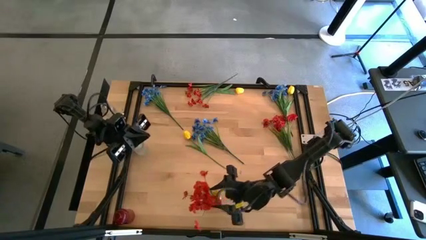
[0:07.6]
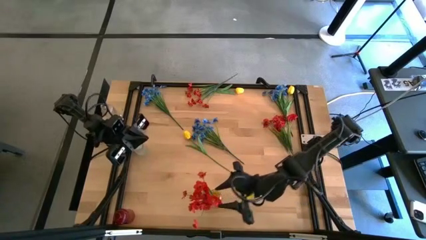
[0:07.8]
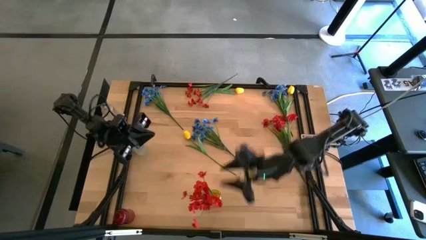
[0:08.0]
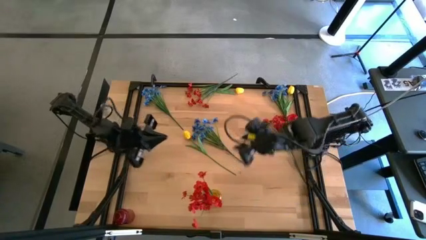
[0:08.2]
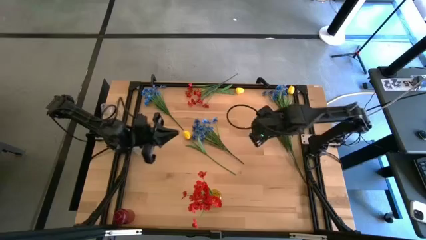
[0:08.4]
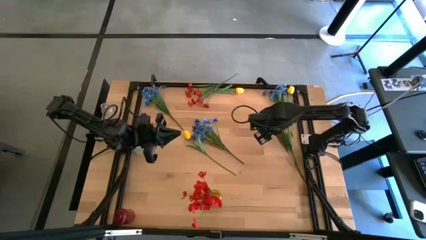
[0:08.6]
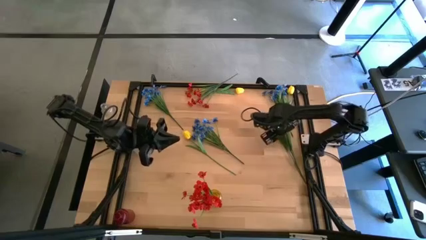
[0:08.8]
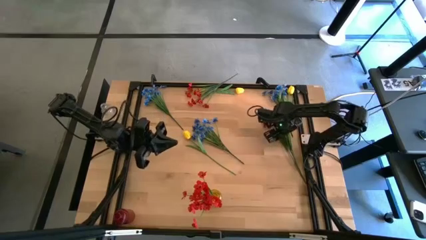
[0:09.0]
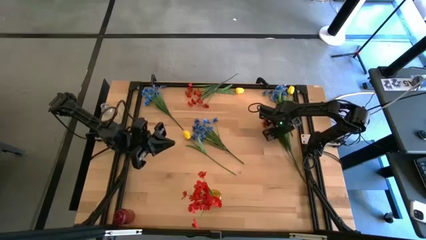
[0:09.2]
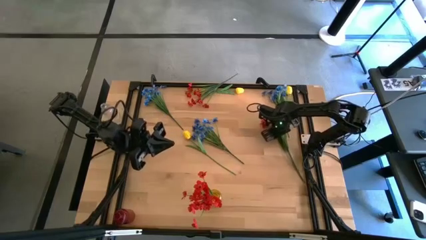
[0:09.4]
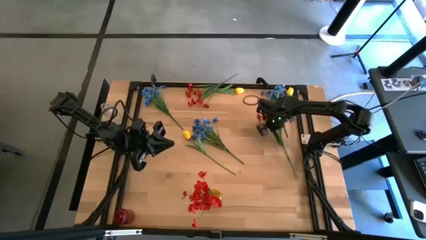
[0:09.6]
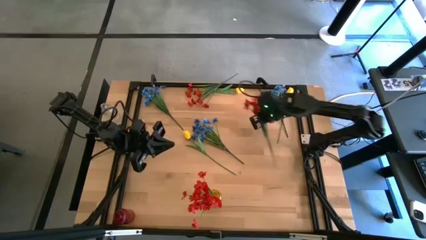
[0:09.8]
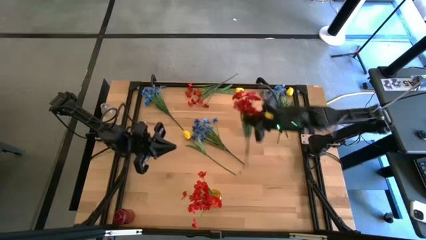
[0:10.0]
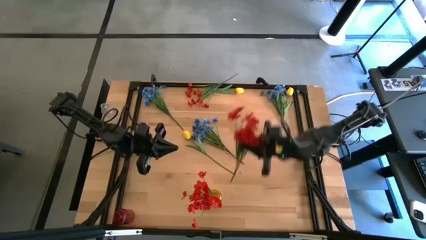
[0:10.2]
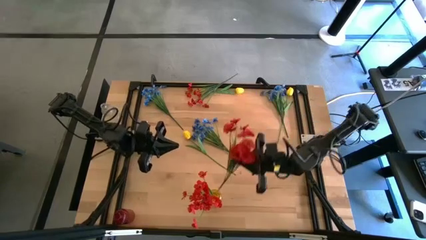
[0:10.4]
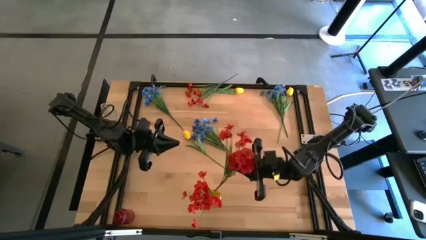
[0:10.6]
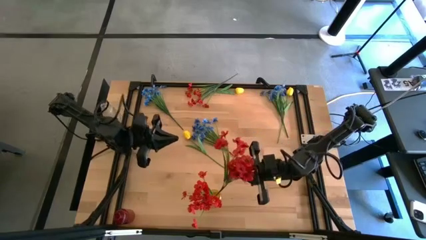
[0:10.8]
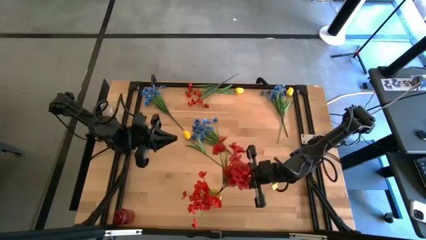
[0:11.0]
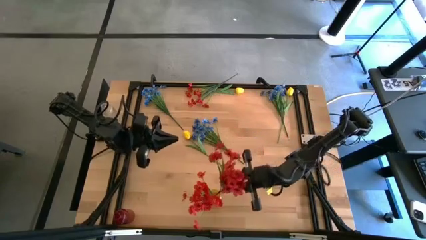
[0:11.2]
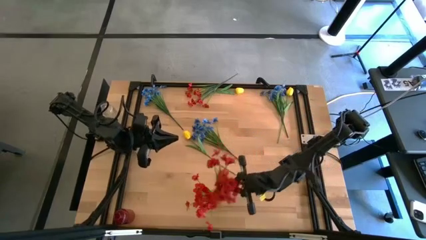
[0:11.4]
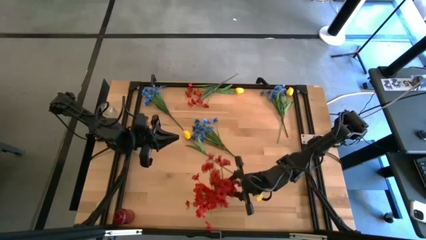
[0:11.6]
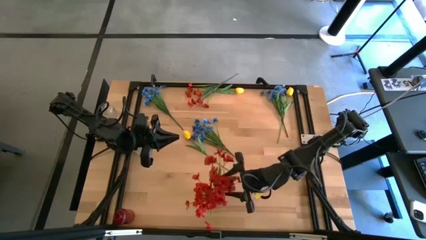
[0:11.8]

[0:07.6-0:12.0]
Task: Sort flowers into vase by color
Put the bottom red flowers into the yellow vase

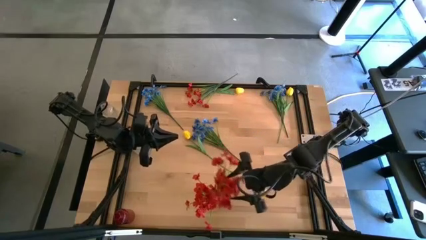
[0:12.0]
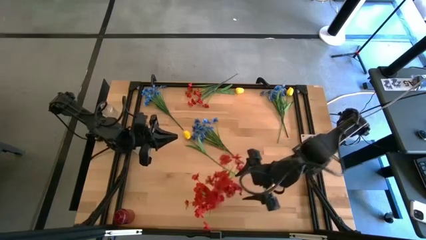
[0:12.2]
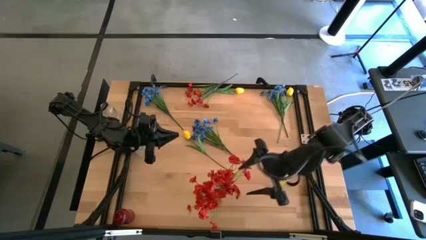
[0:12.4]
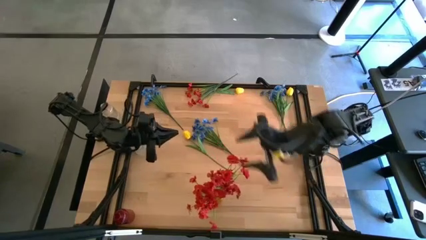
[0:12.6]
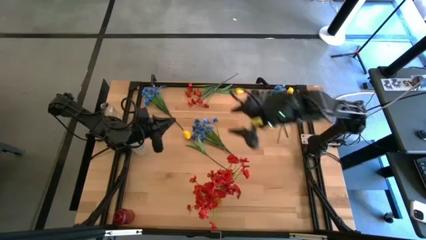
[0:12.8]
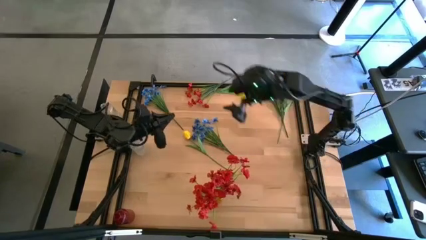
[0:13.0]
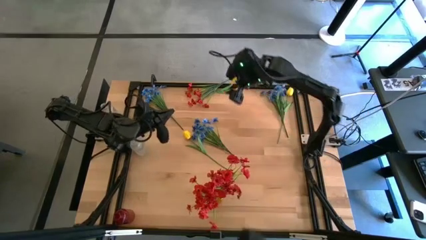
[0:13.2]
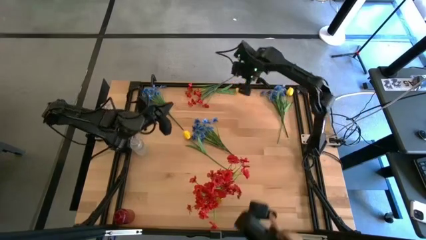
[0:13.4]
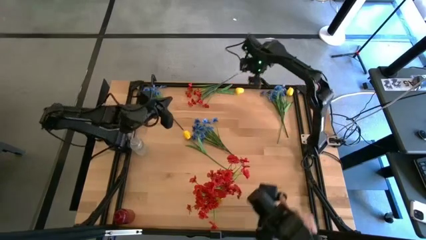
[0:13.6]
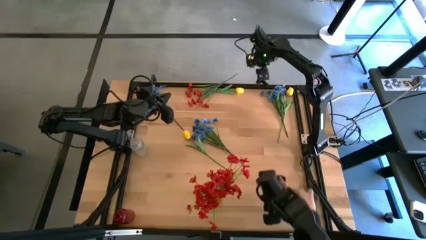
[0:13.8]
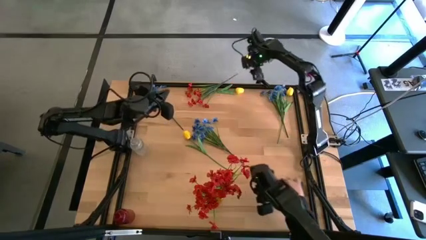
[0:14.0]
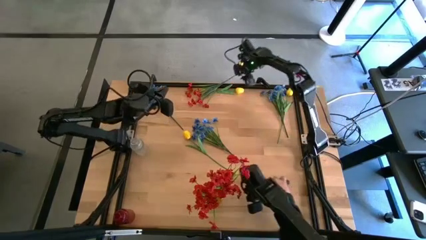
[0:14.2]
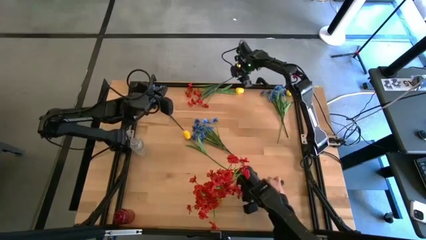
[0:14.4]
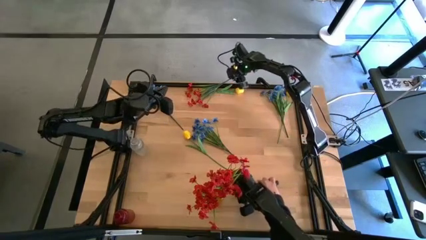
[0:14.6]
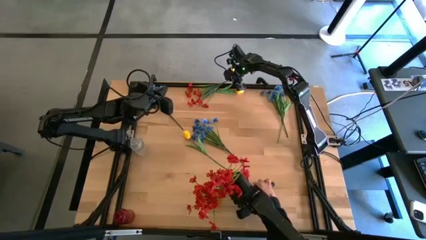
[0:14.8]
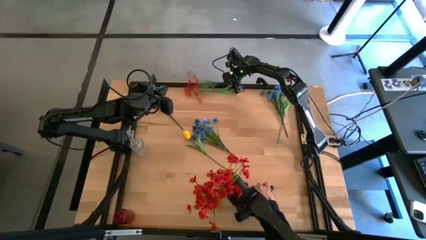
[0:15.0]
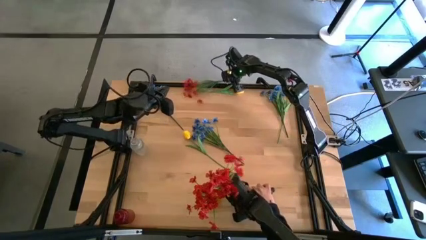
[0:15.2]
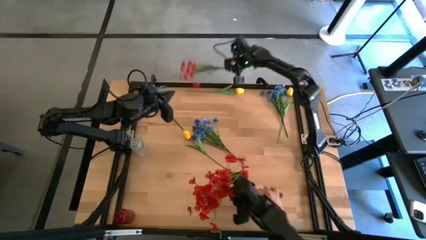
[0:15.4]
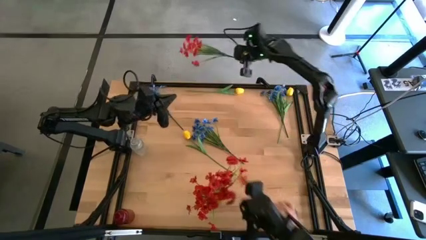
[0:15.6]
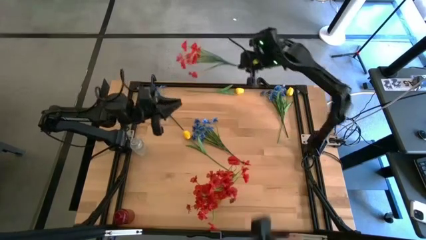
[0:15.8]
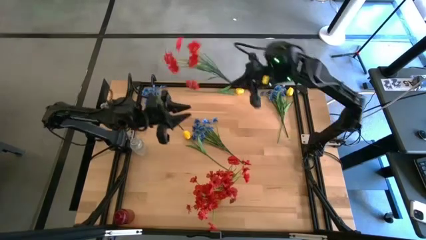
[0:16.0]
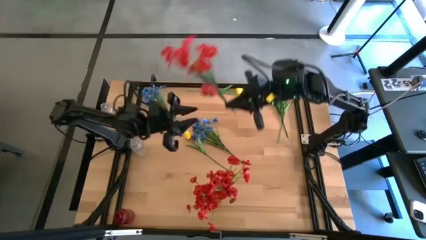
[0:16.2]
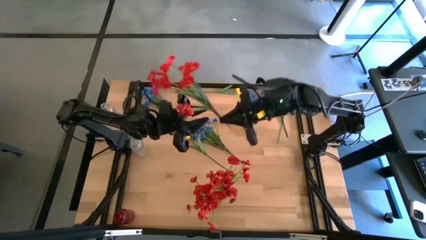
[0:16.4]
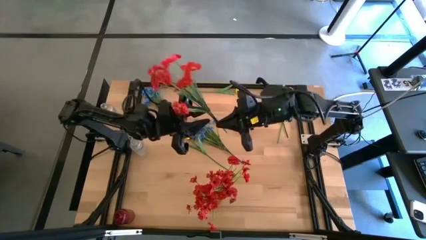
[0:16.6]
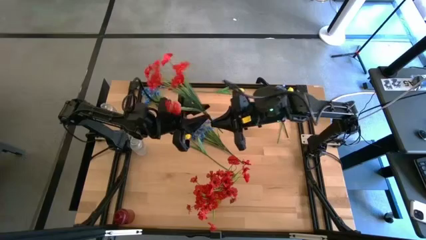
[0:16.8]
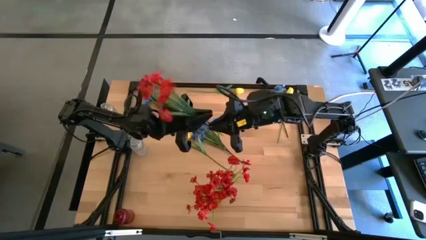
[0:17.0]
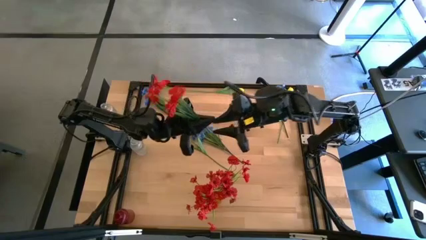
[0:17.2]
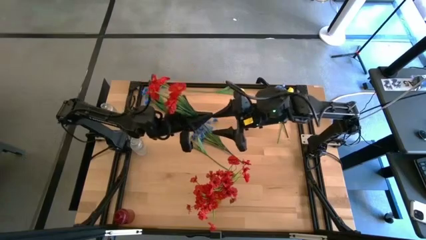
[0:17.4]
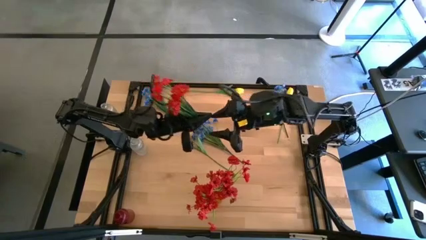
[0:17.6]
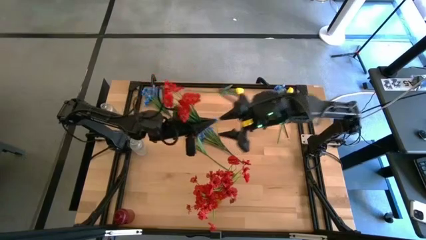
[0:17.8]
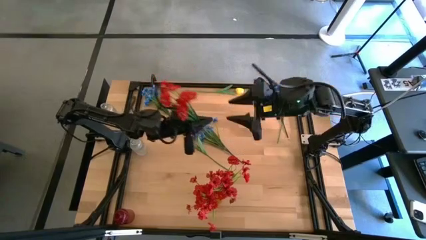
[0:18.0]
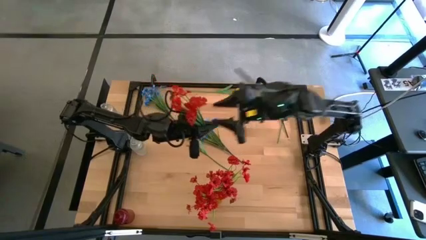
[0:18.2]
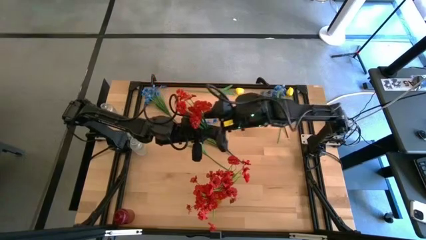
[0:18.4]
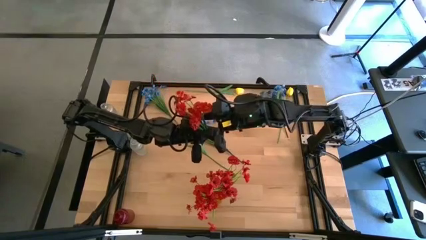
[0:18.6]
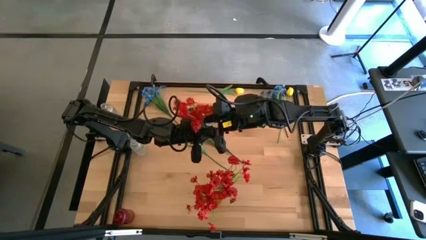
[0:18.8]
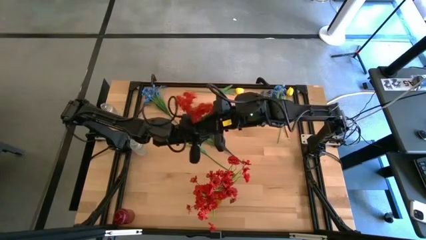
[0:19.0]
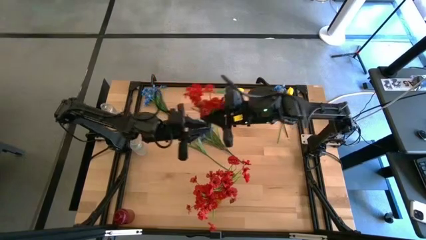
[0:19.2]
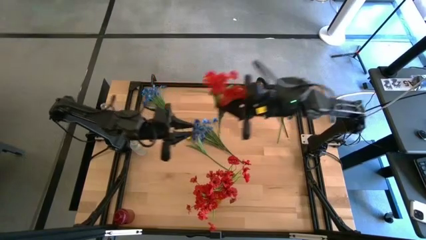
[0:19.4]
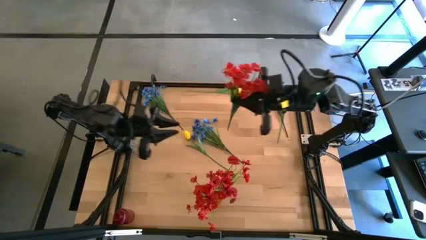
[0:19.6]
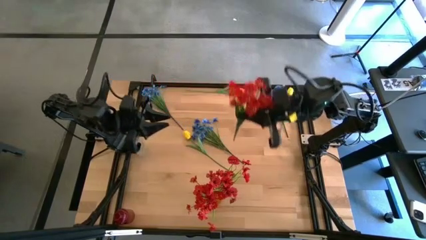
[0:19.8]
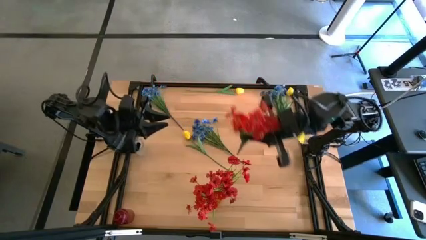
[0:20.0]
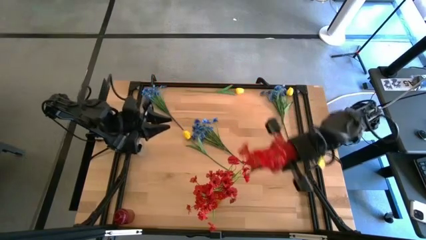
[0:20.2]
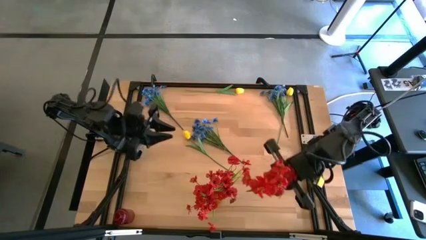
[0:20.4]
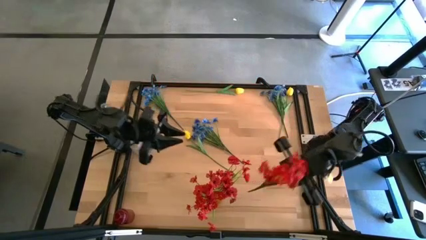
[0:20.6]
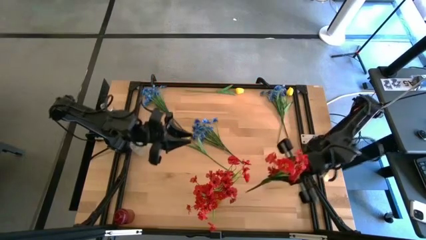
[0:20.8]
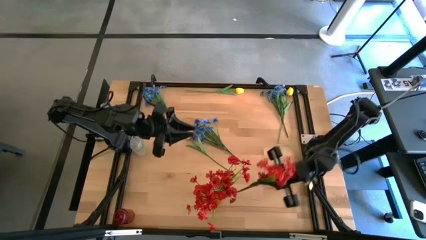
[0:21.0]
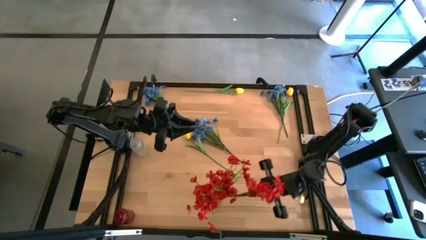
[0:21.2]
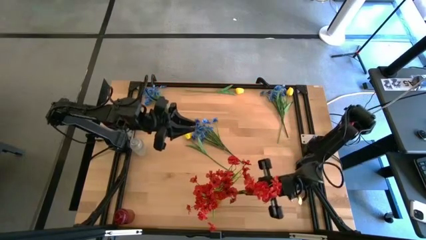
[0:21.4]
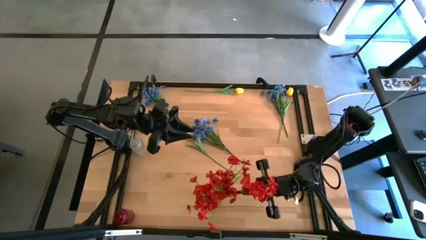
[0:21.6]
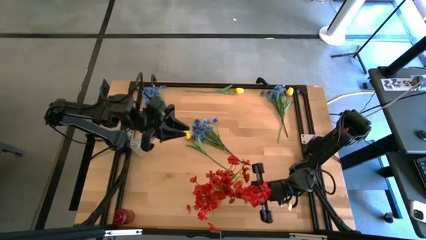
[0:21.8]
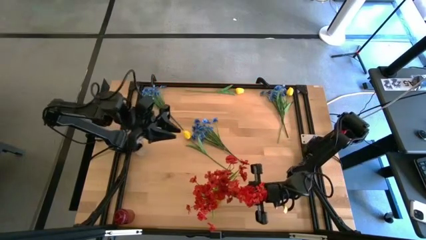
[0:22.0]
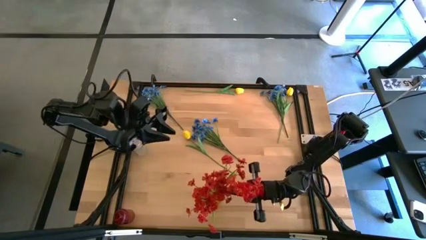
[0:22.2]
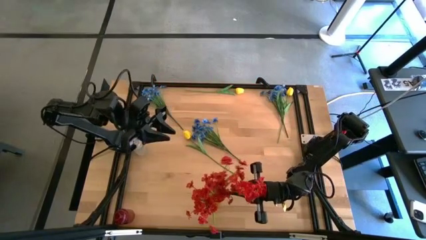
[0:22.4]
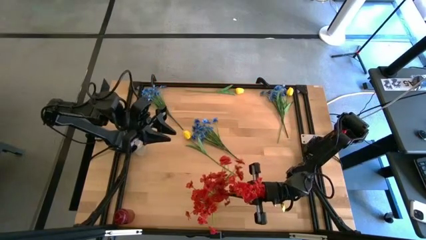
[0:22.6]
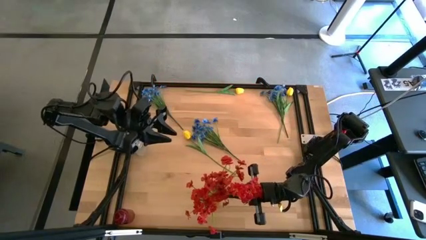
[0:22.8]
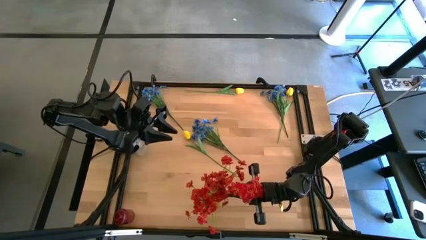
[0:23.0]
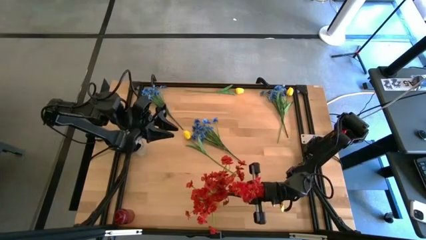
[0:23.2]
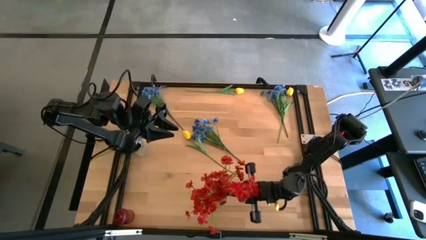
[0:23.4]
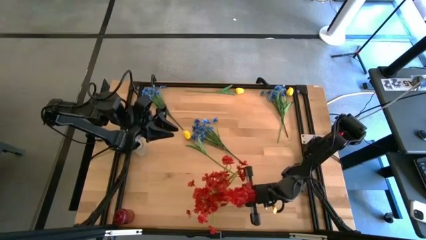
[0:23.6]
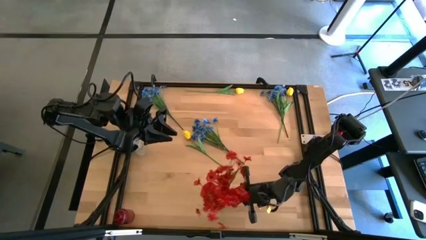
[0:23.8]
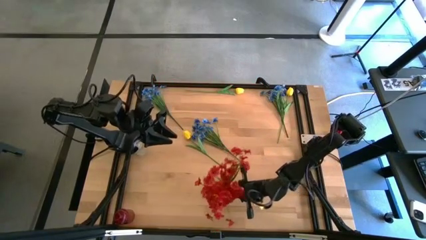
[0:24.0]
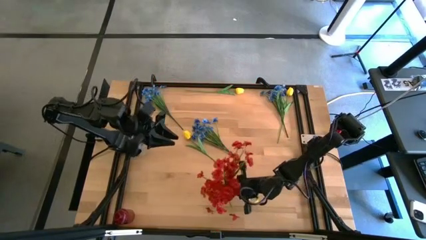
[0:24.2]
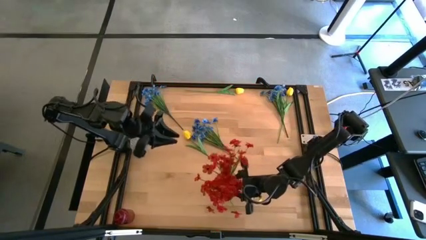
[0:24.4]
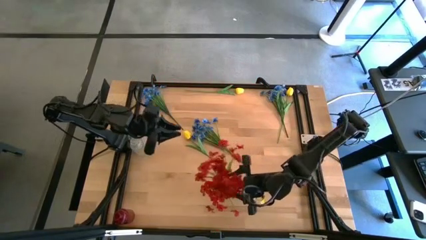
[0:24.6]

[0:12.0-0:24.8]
Put the red flowers into the yellow vase
